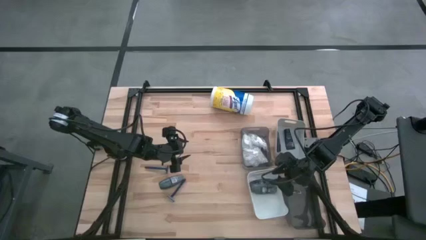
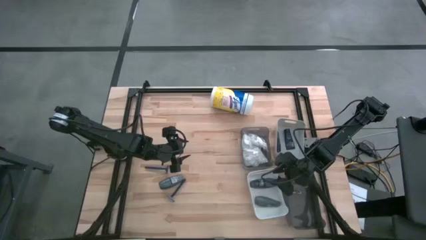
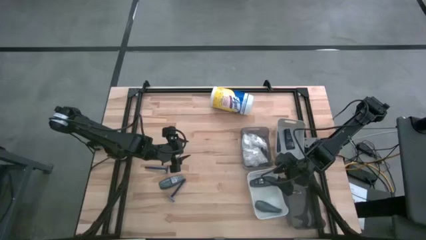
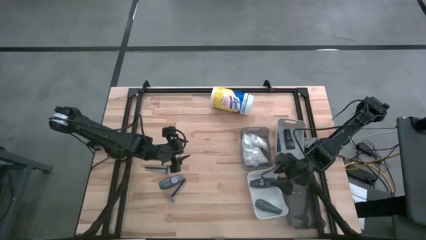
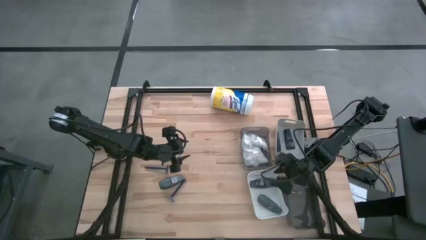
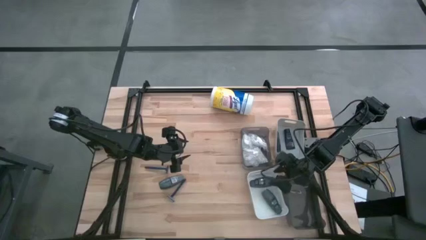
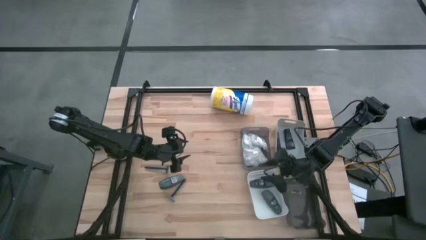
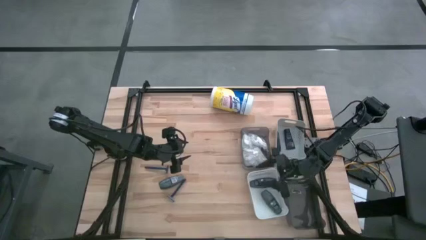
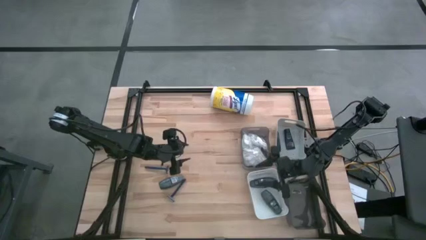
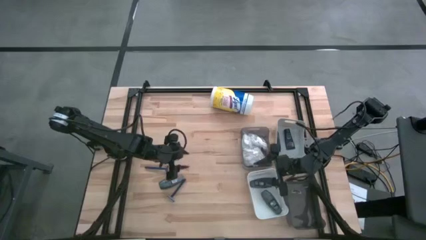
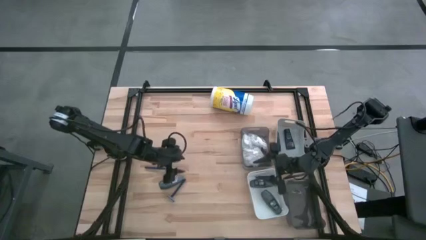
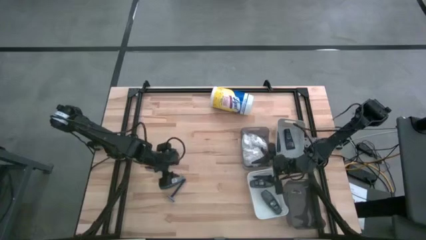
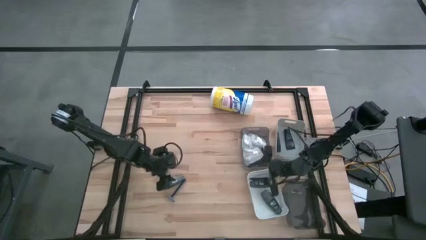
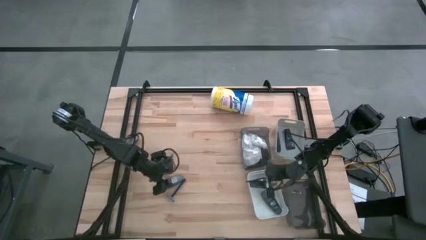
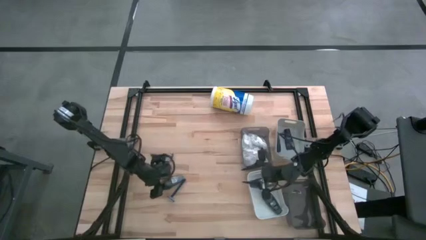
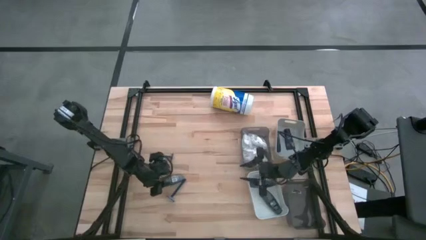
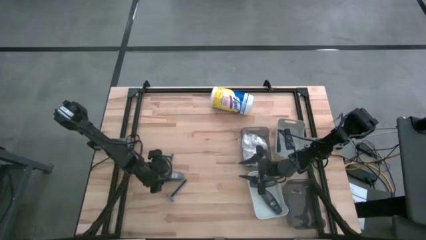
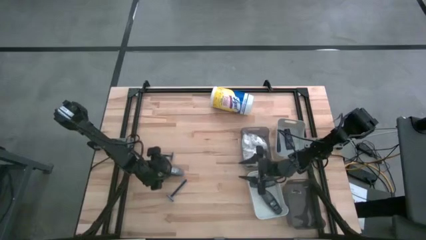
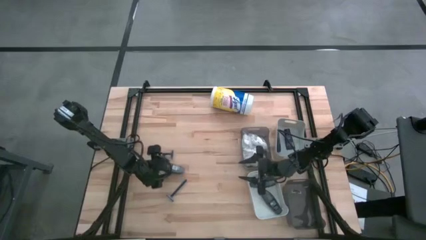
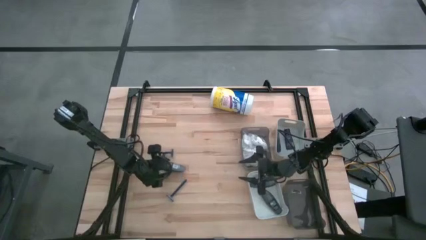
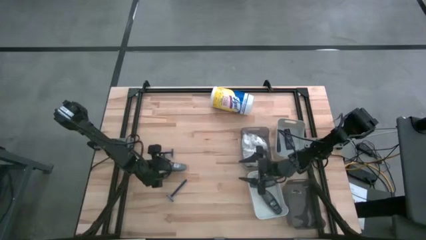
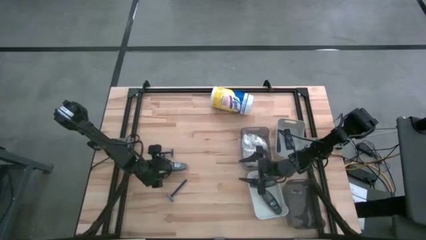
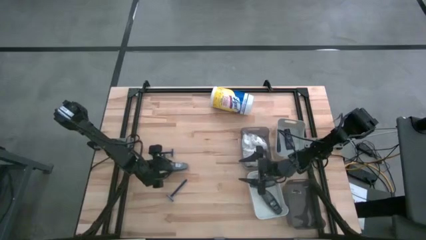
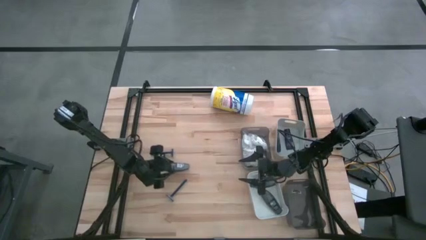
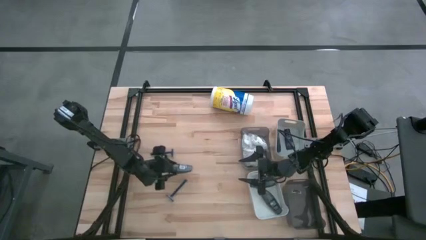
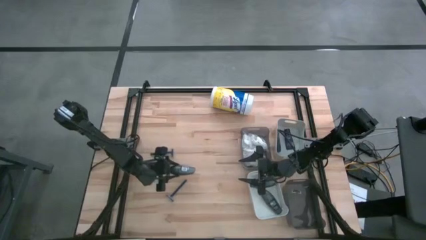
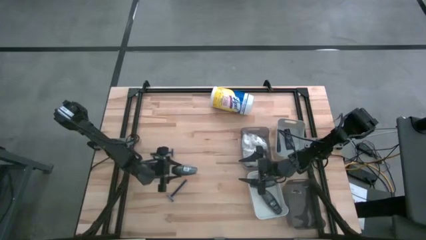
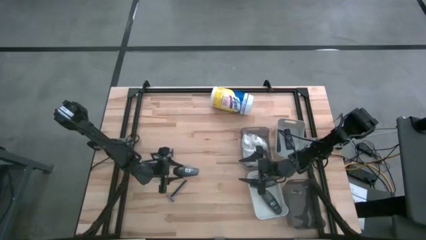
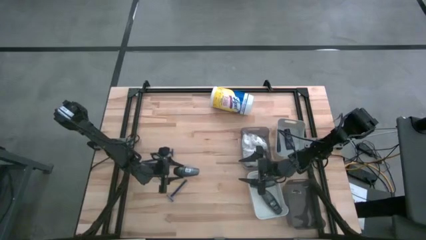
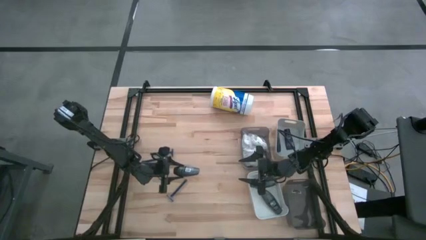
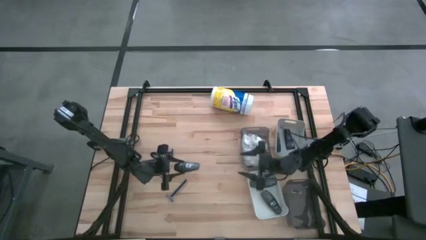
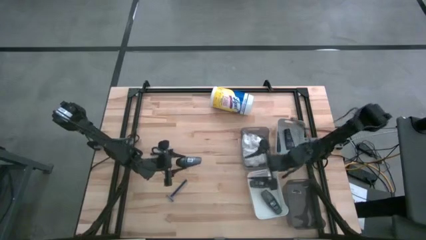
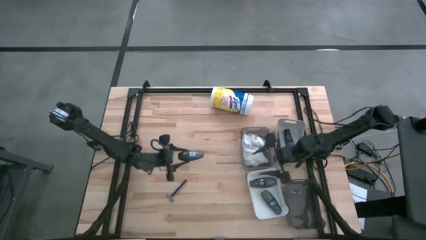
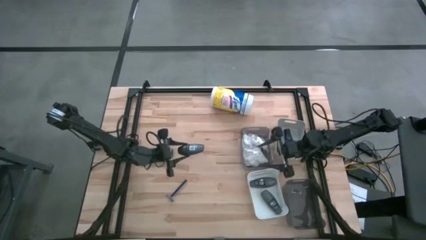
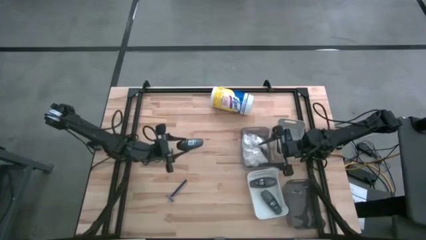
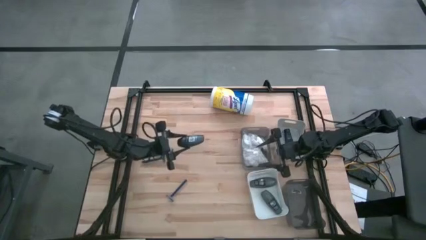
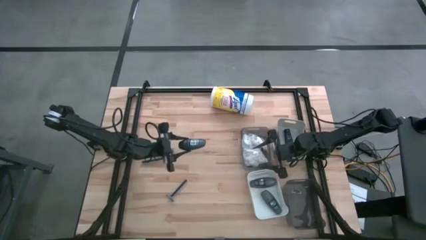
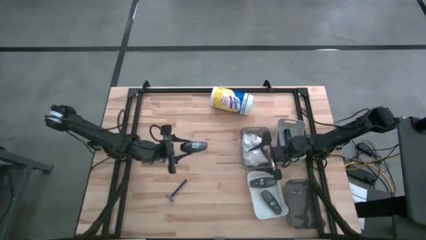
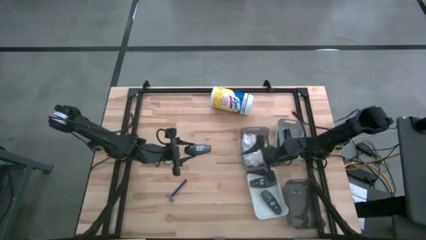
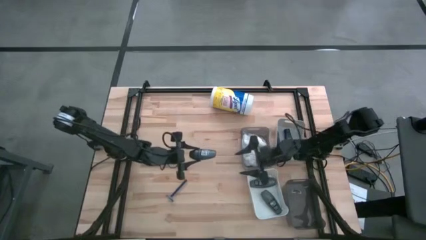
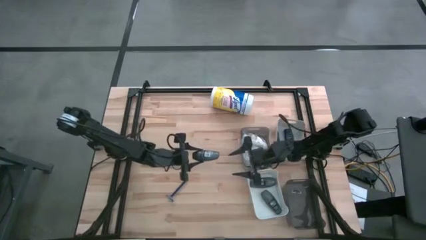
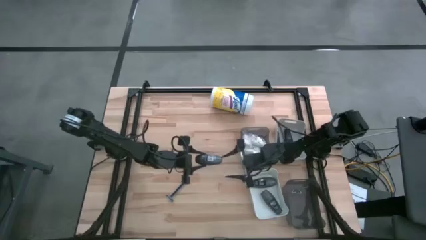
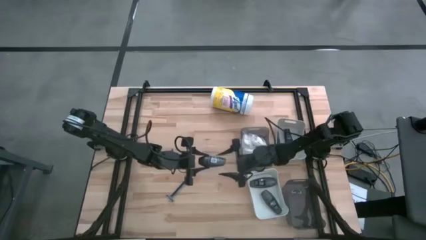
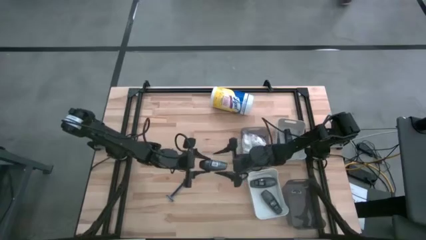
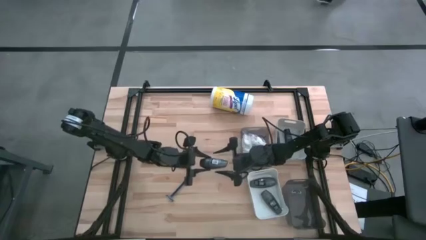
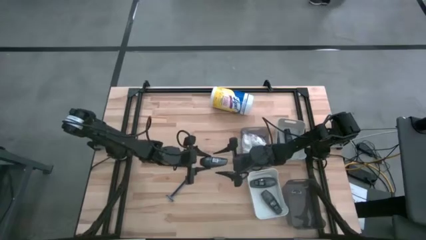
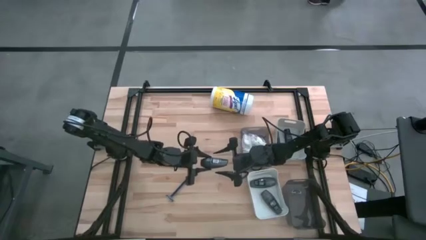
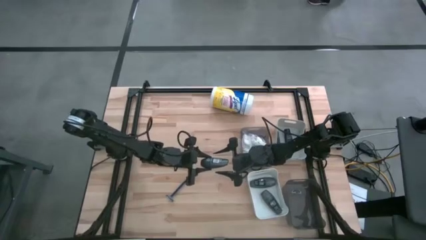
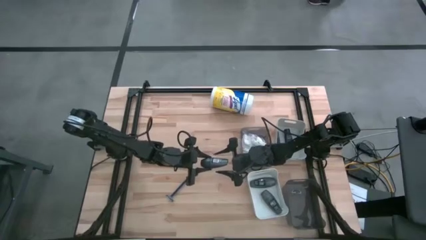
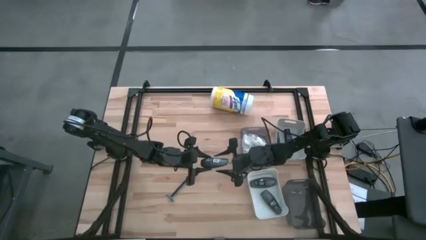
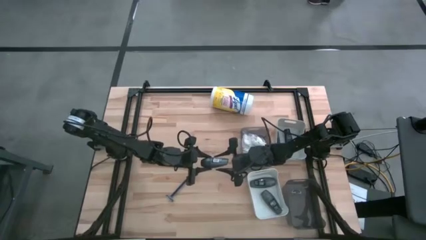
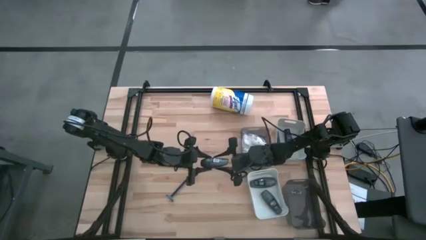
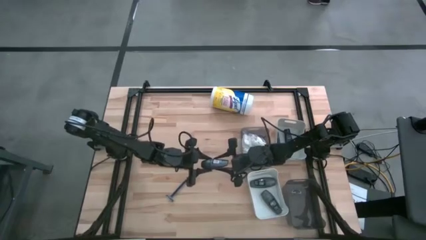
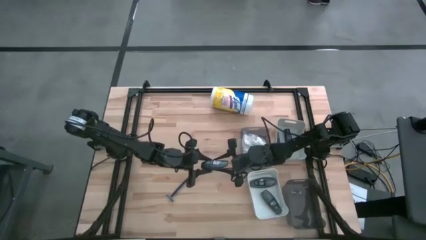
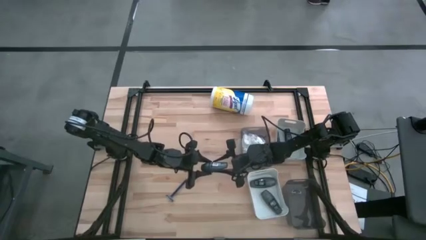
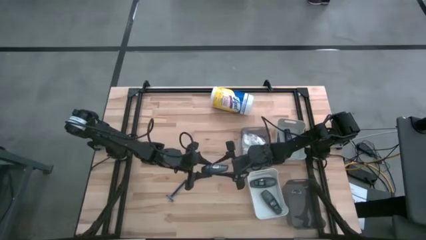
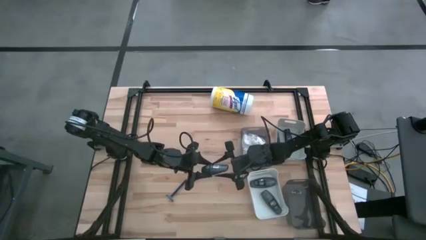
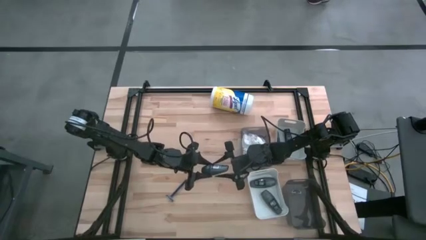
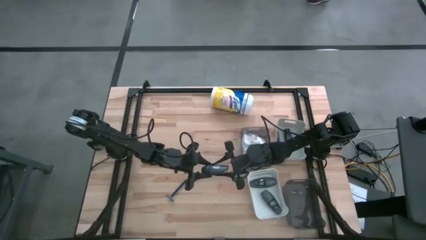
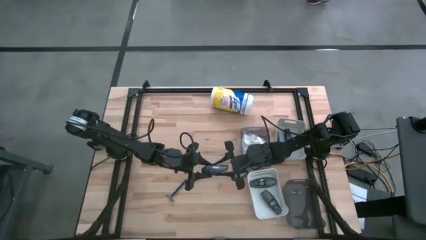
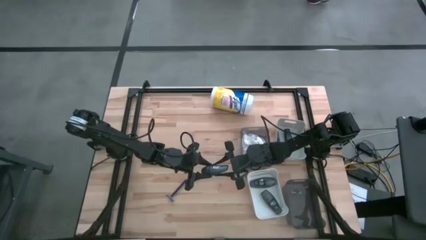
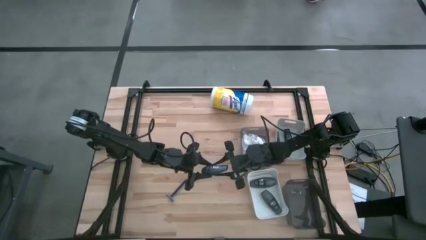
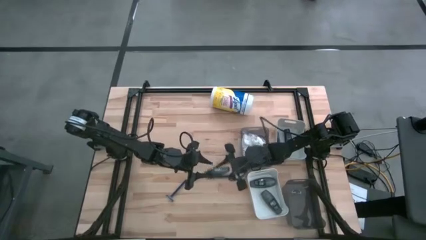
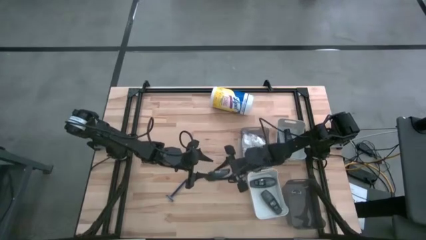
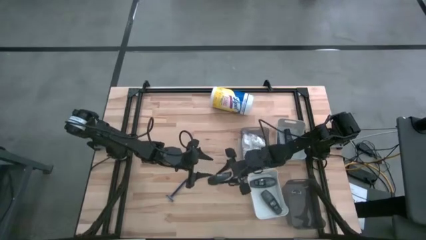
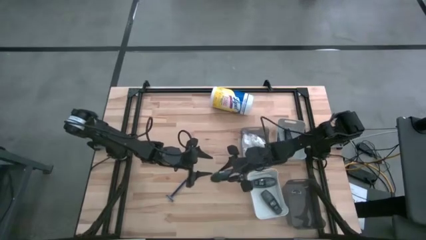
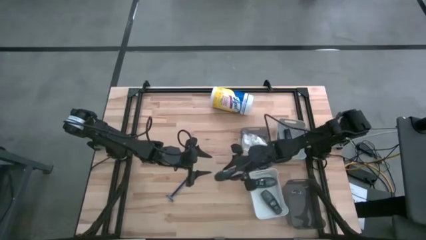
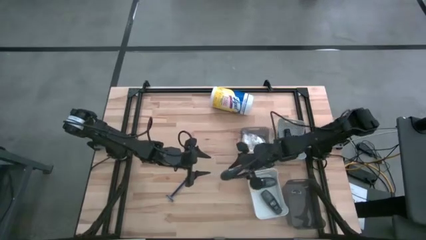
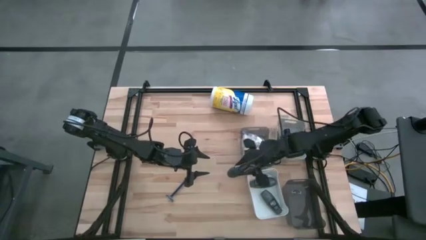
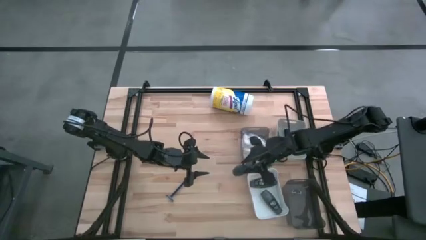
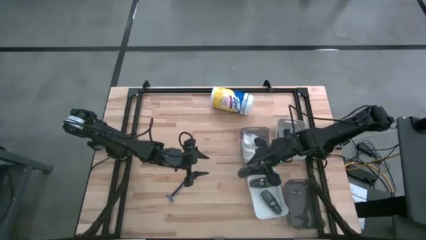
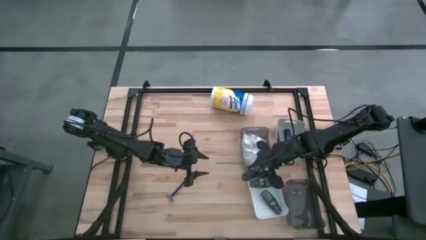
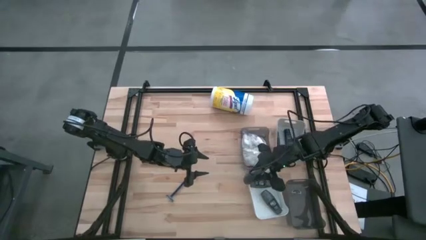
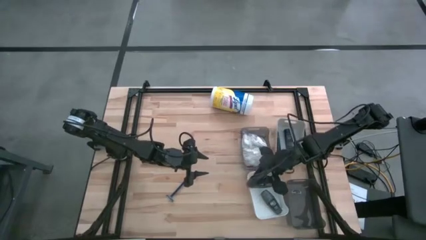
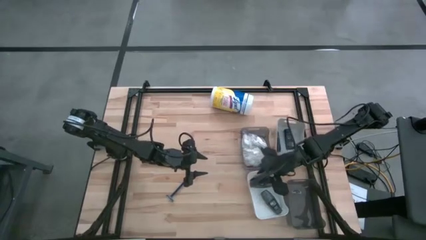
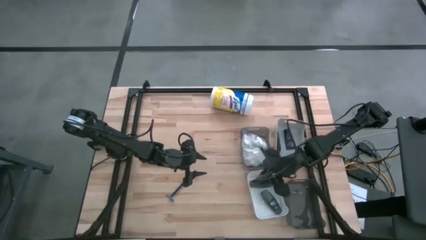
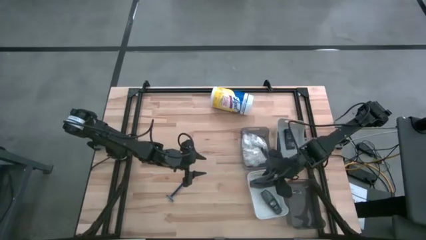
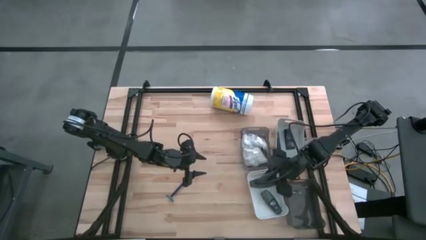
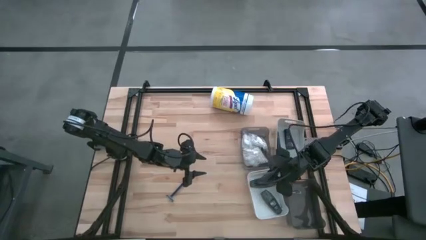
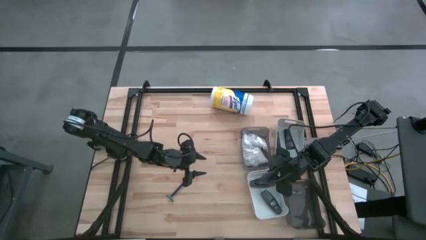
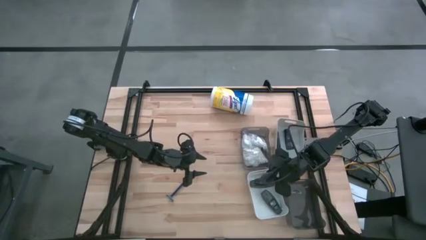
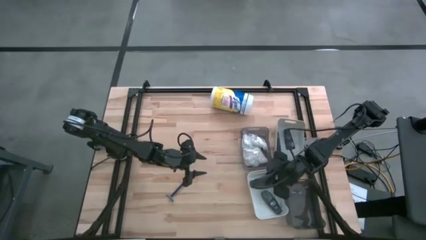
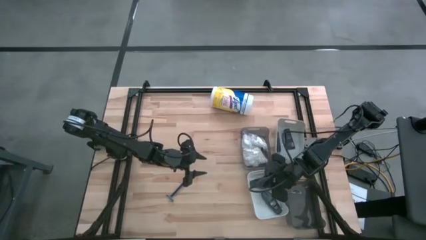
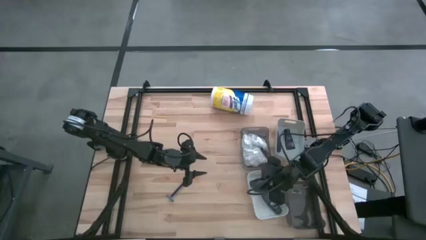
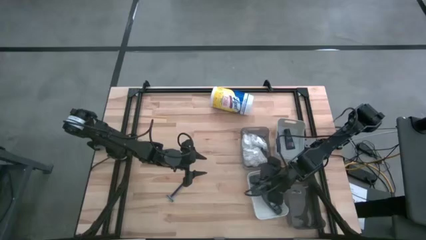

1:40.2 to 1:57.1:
Task: Pick & Place Travel size toiletries
Put the deodorant into the white bin
